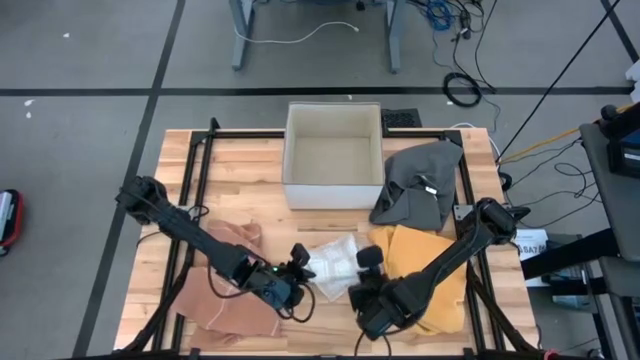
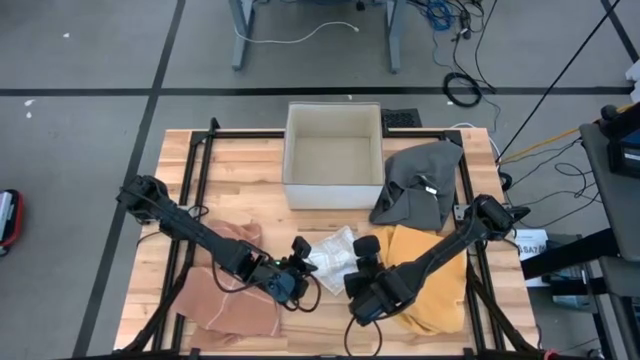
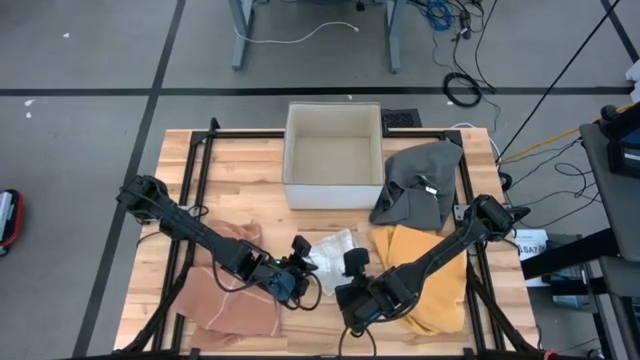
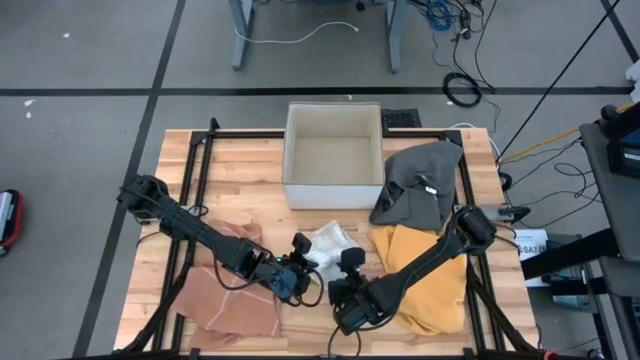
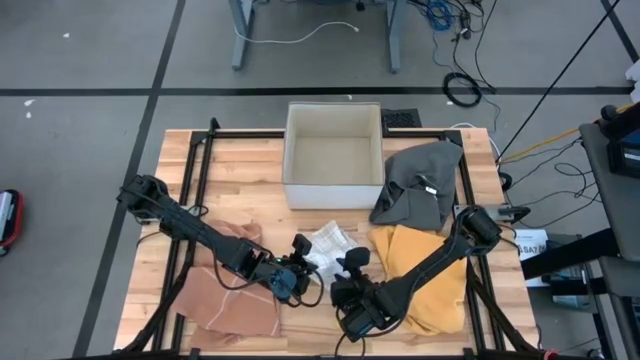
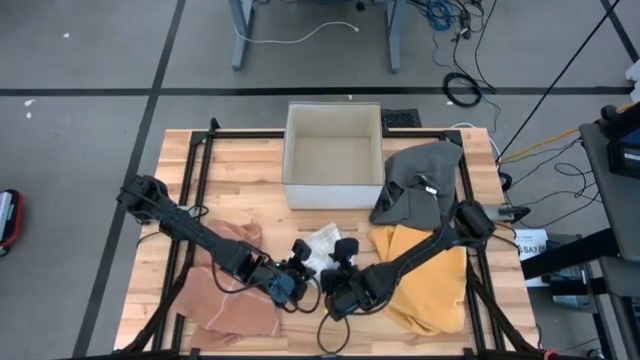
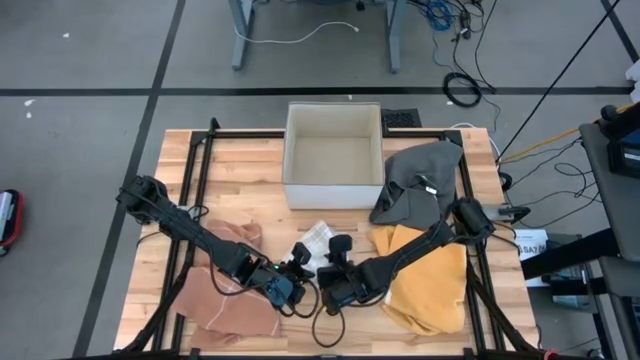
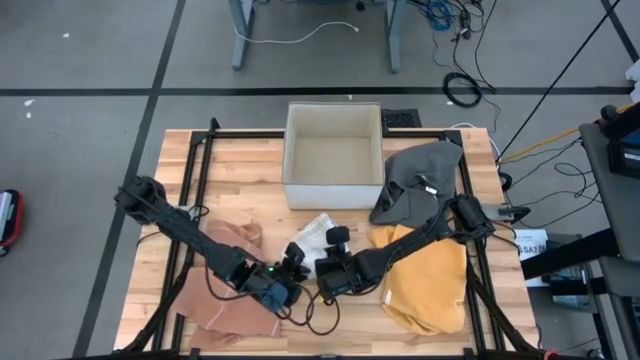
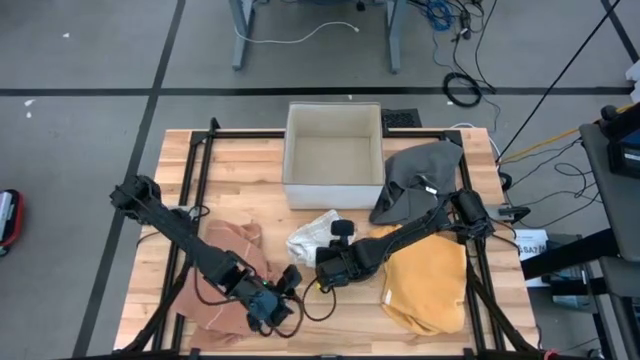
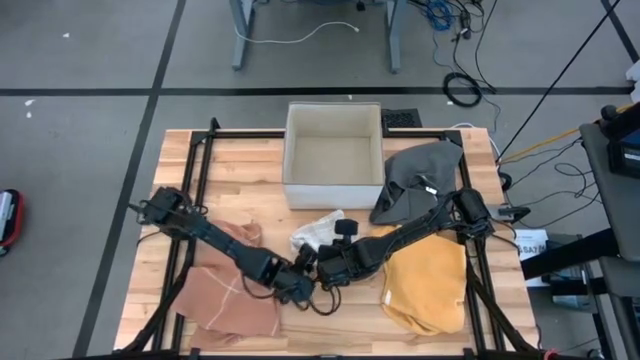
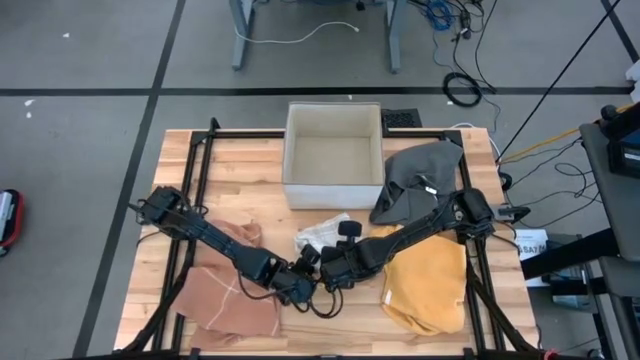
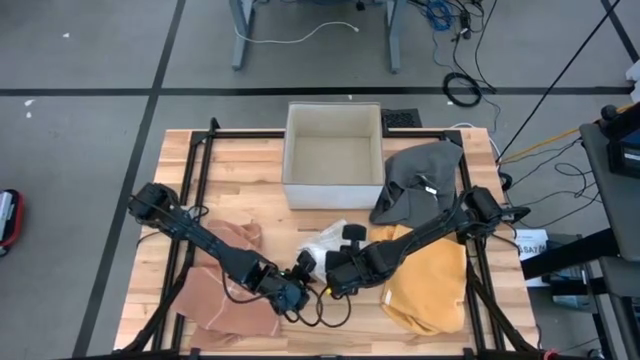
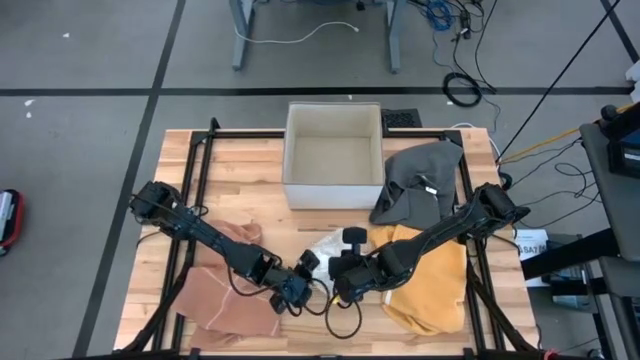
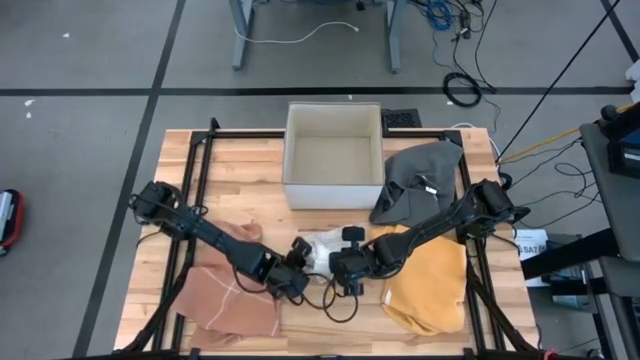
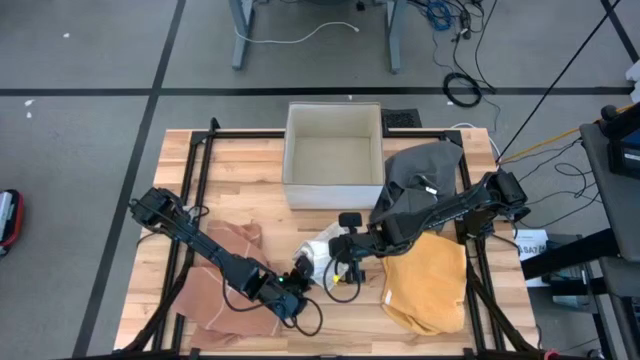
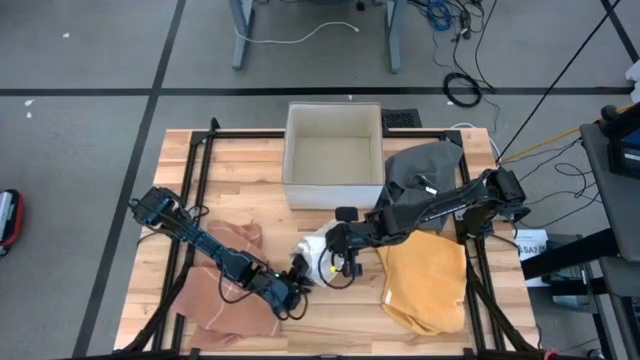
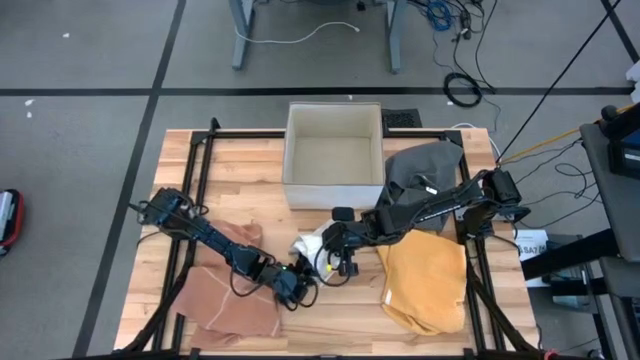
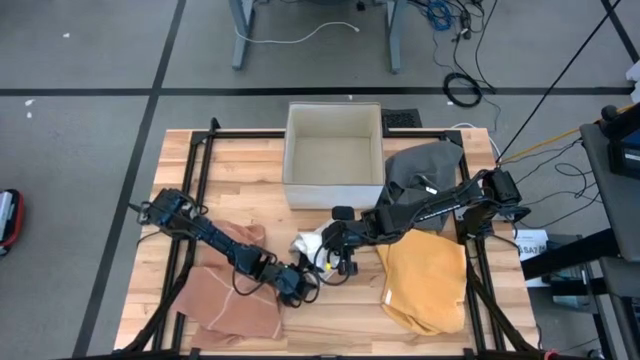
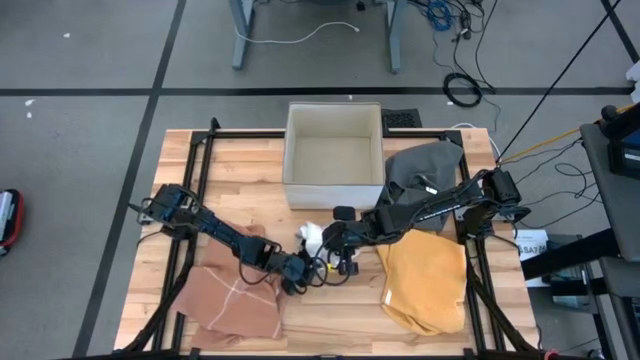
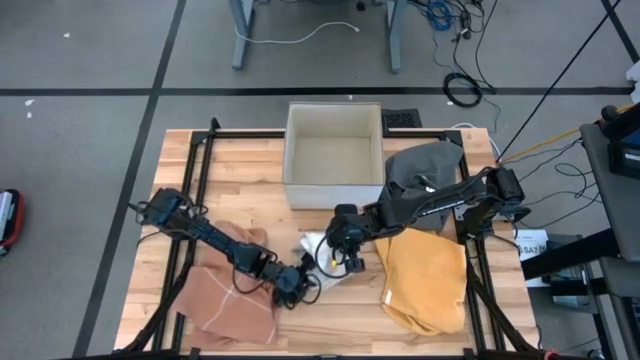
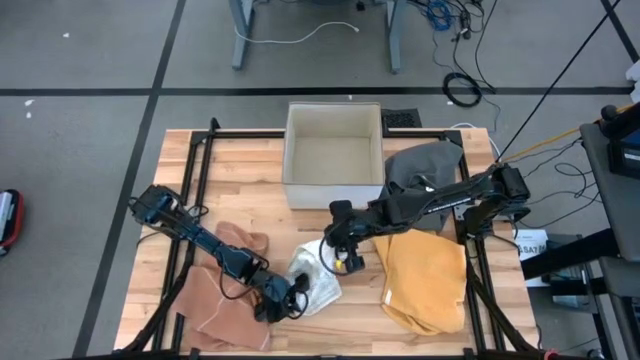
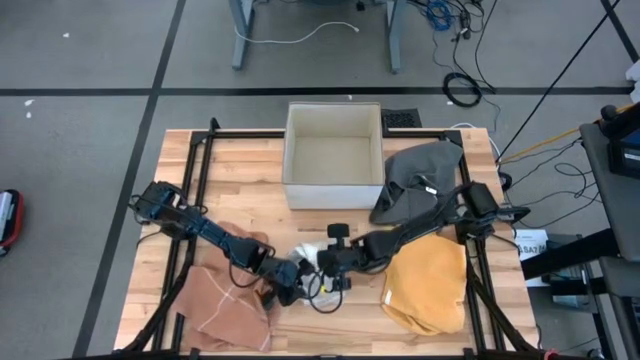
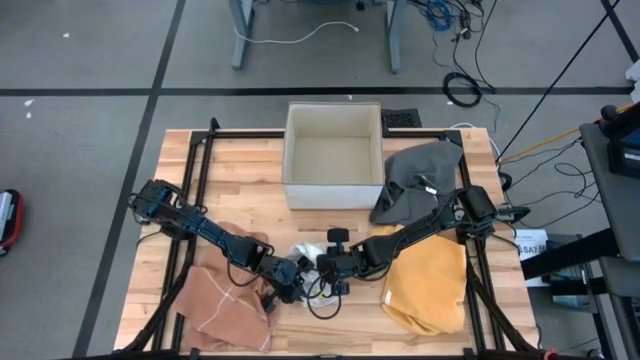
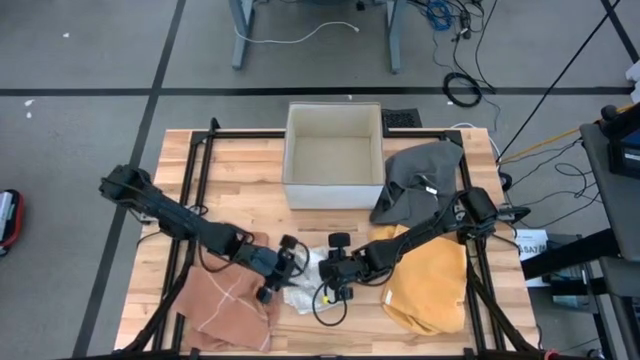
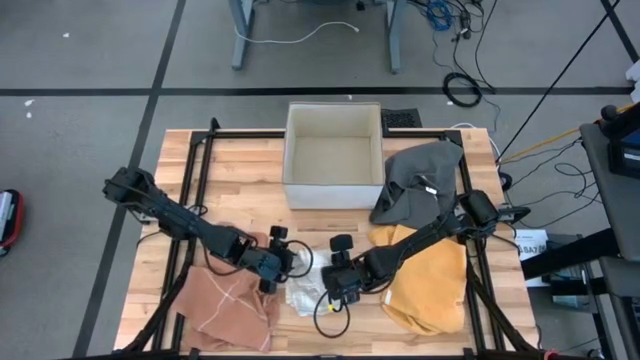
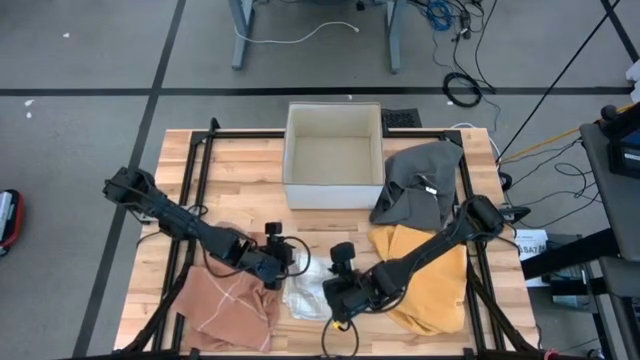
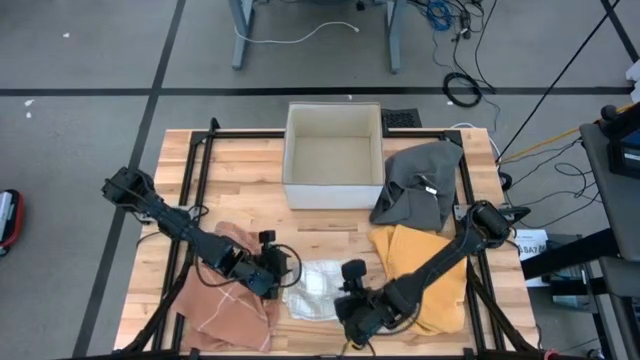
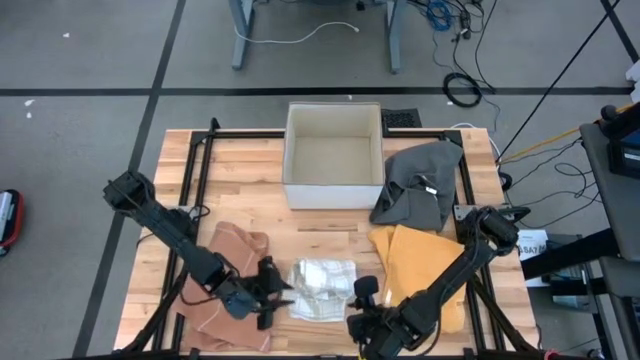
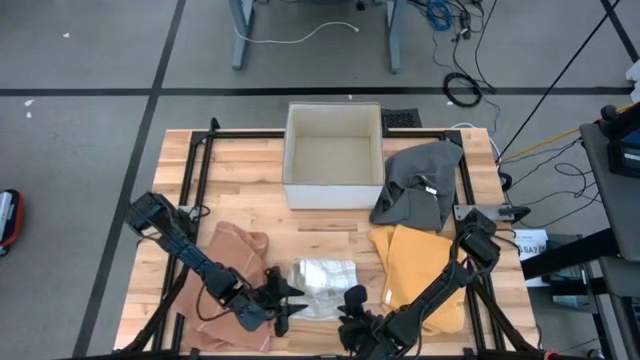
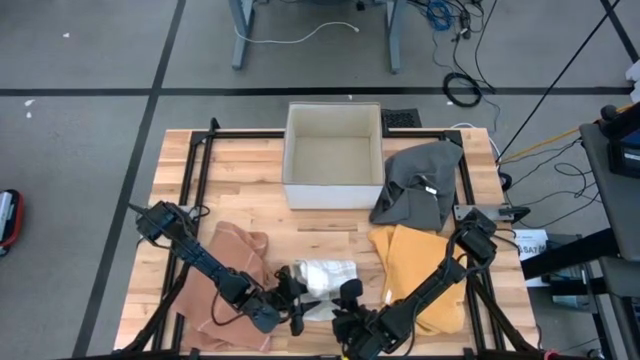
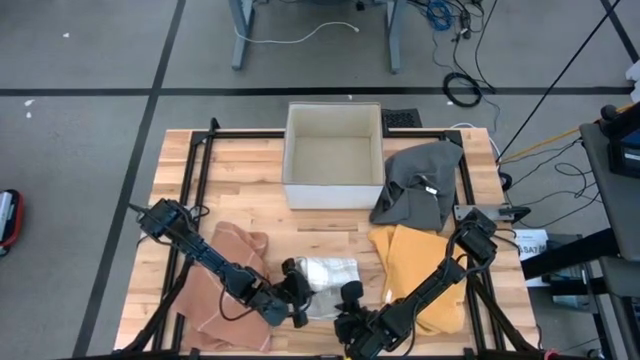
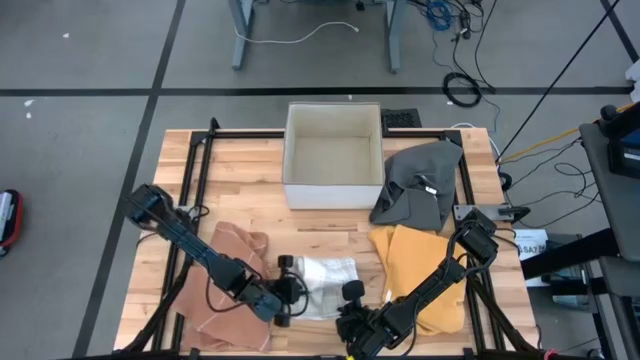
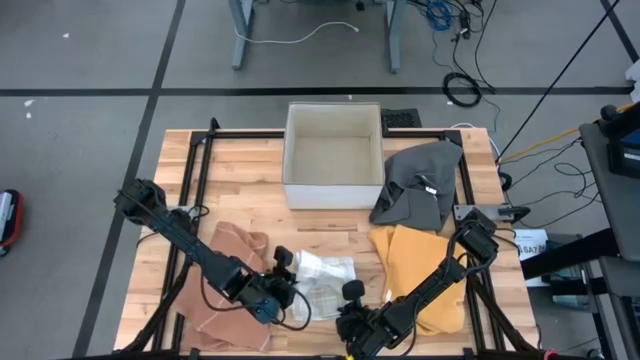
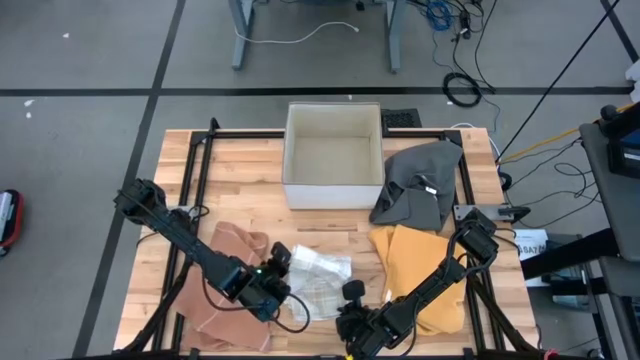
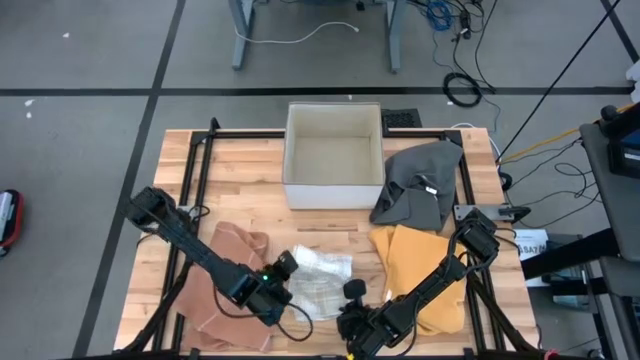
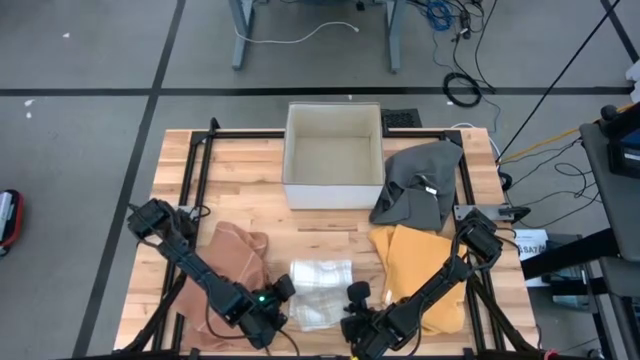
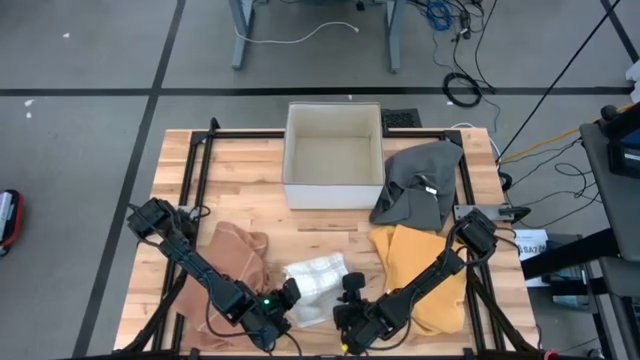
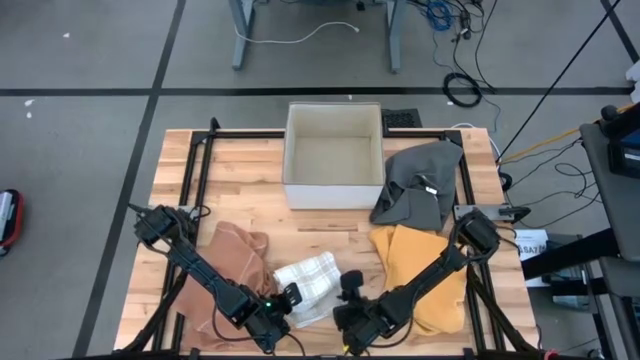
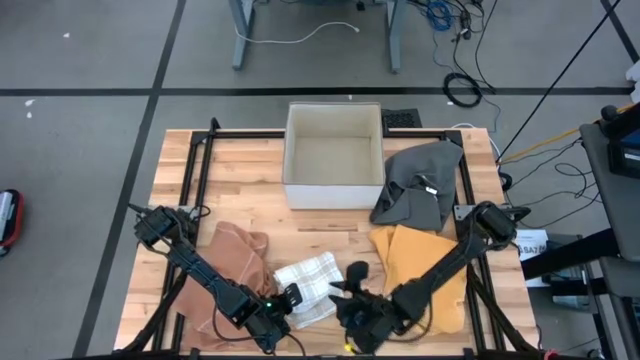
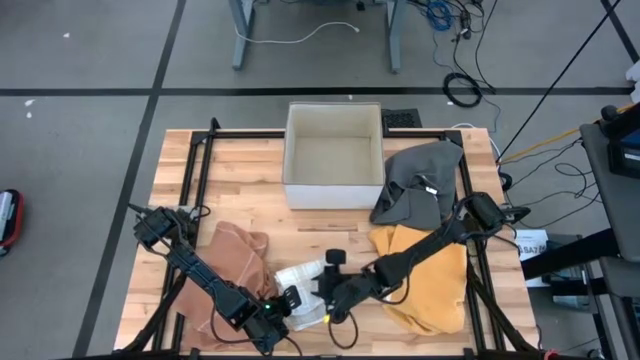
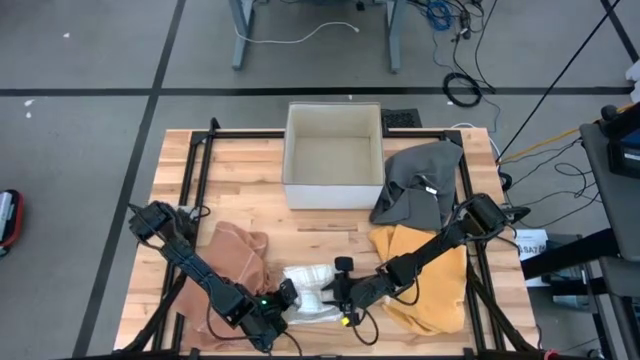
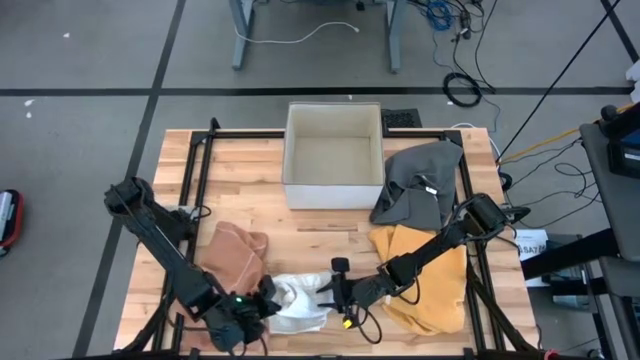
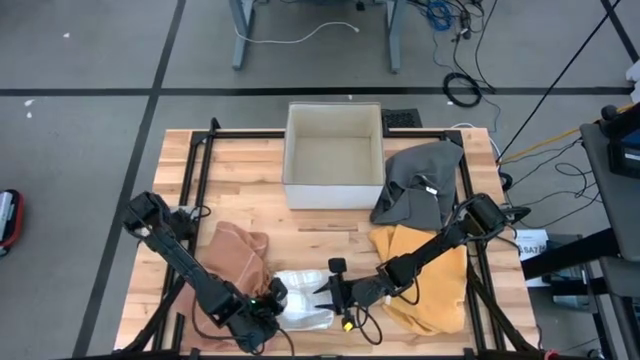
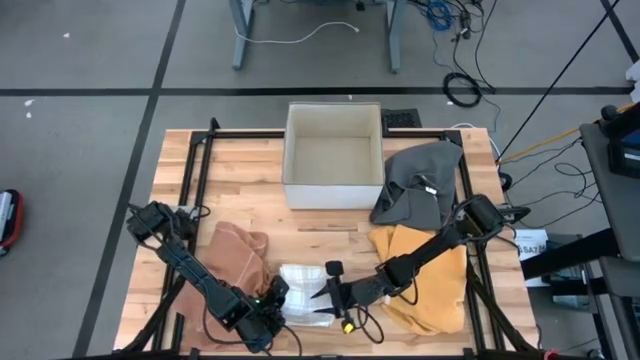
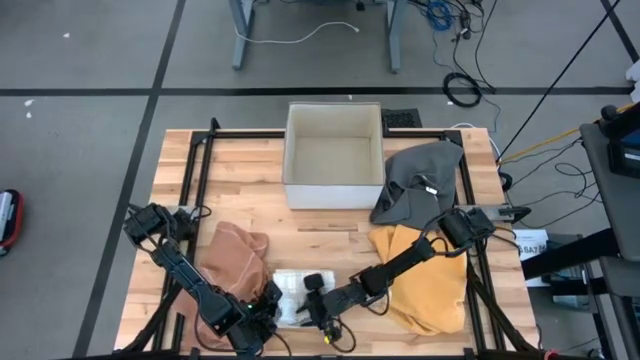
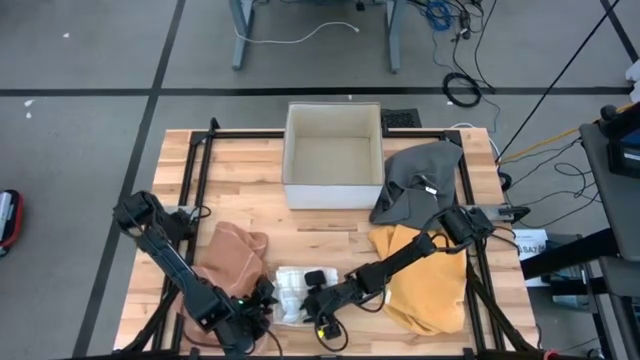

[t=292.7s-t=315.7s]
Task: Fold towel
Fold the white patterned towel
